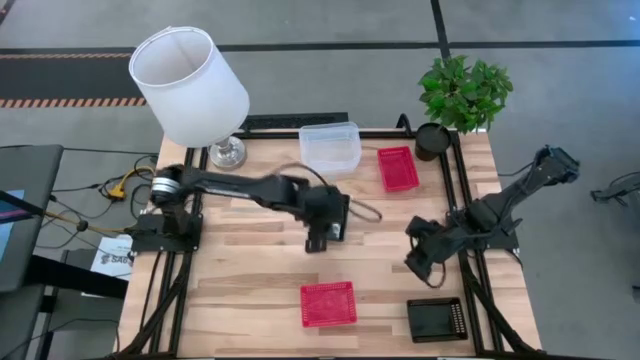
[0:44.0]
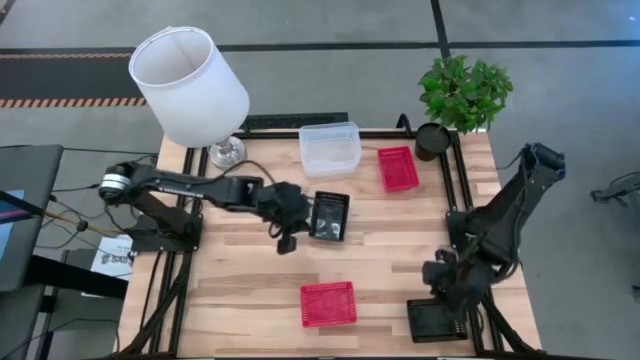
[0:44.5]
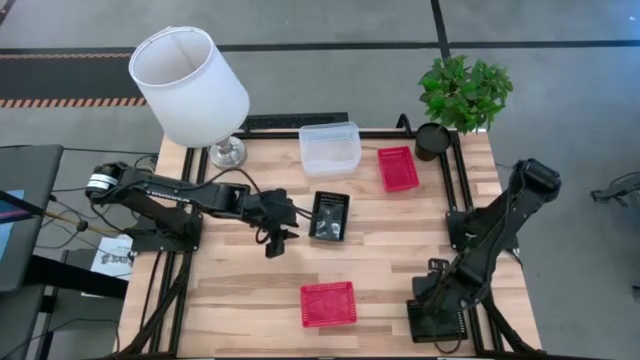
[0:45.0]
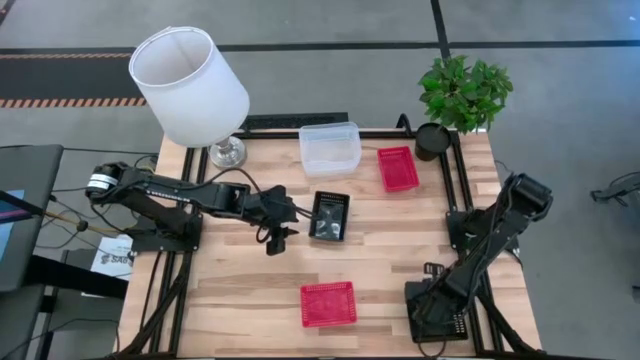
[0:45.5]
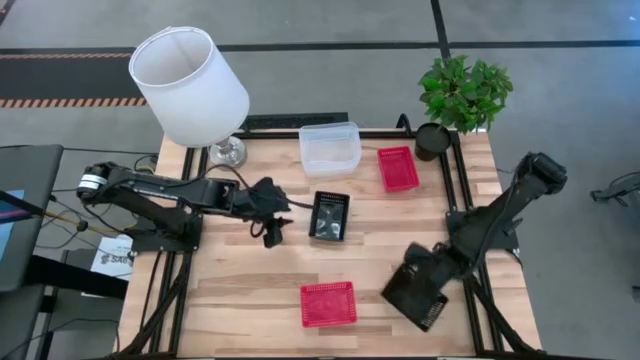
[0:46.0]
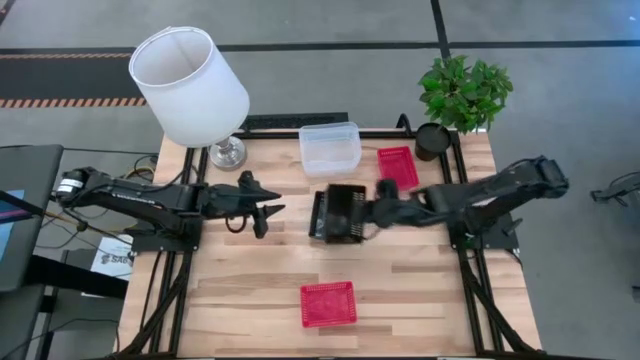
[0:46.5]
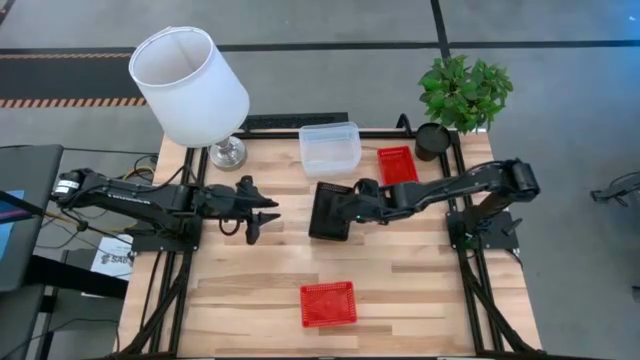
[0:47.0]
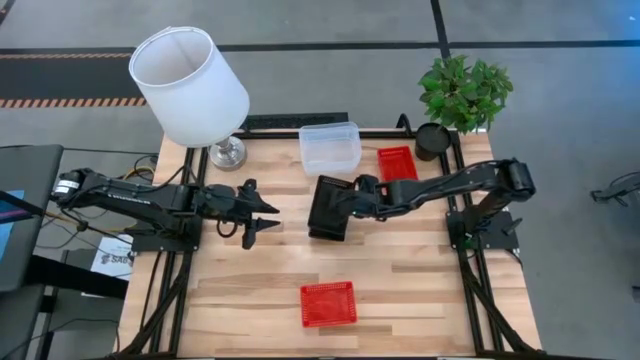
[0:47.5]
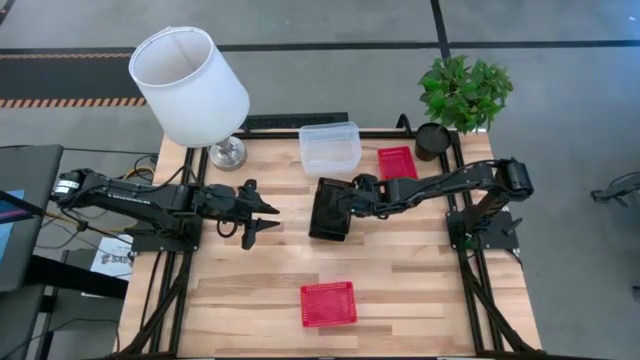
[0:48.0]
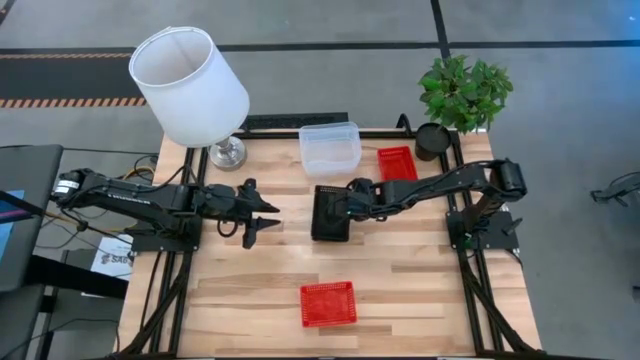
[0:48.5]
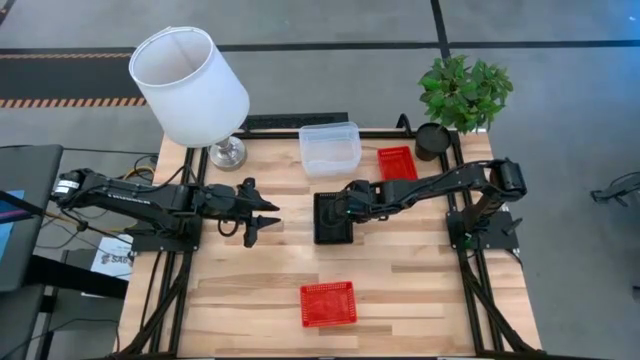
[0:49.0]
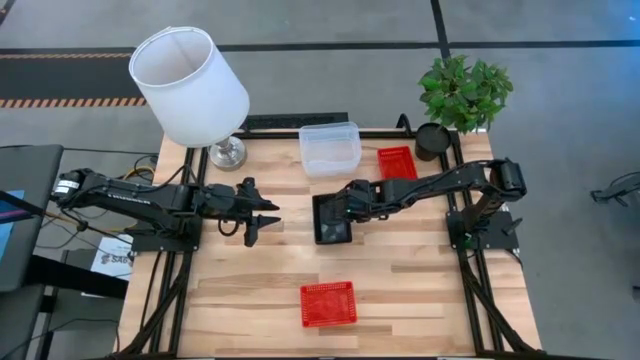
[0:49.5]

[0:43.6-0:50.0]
Stack the bottom black bin on the black bin

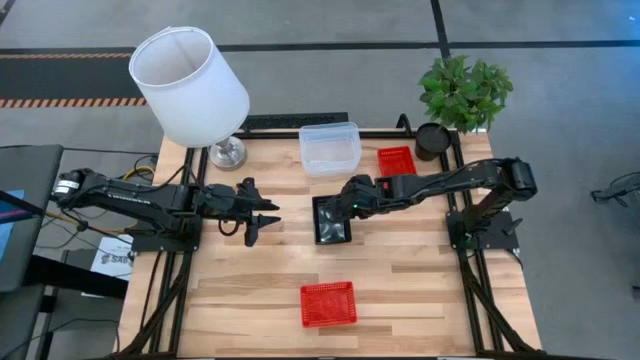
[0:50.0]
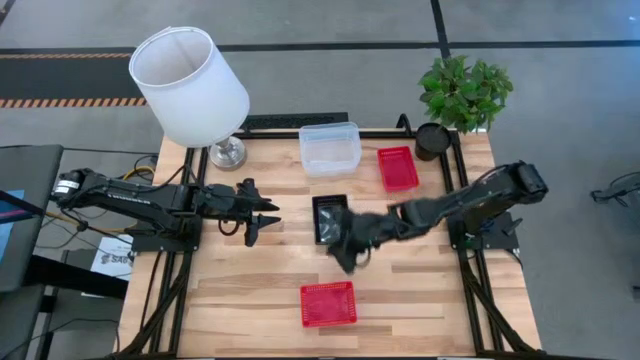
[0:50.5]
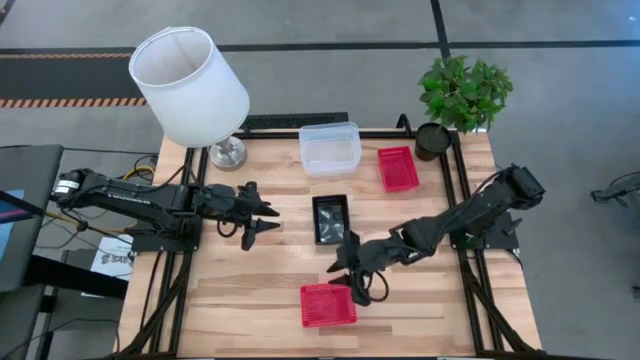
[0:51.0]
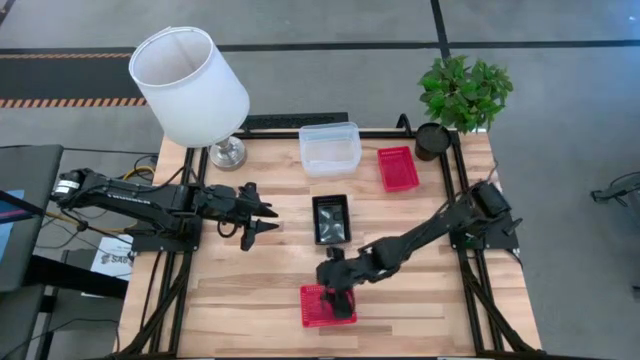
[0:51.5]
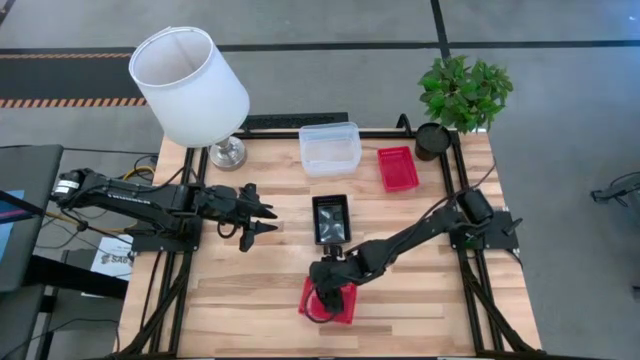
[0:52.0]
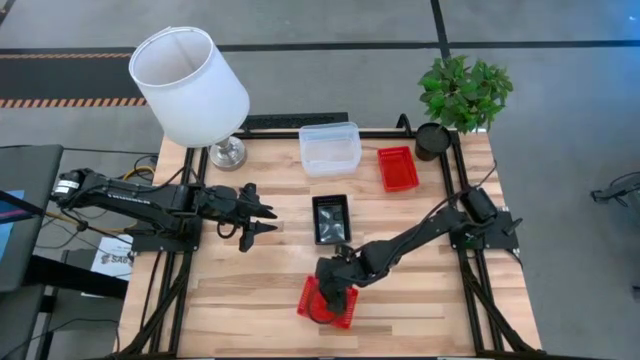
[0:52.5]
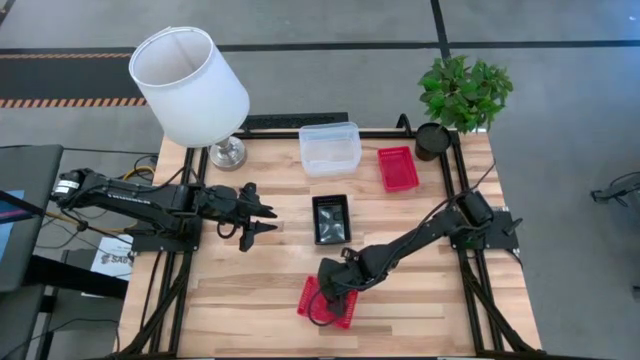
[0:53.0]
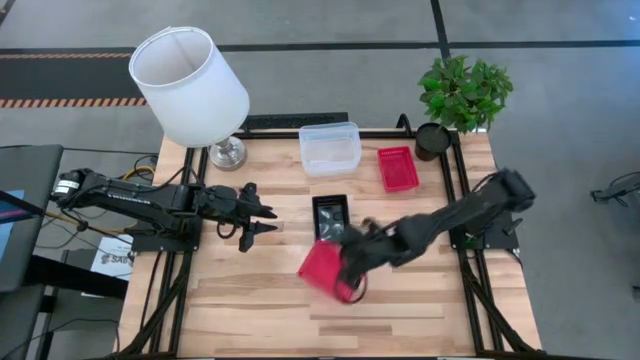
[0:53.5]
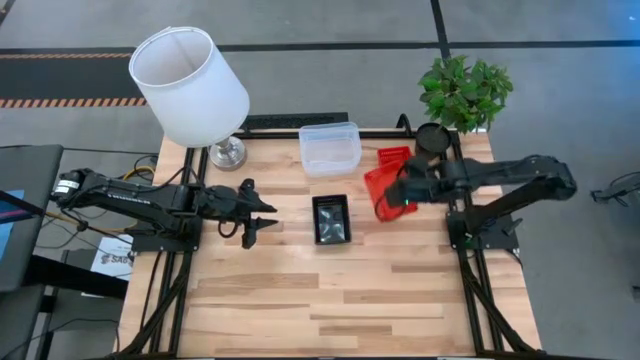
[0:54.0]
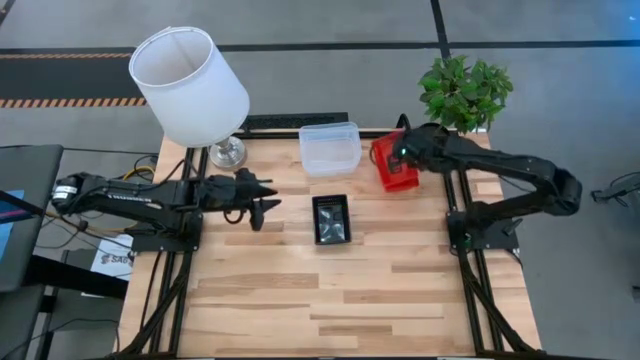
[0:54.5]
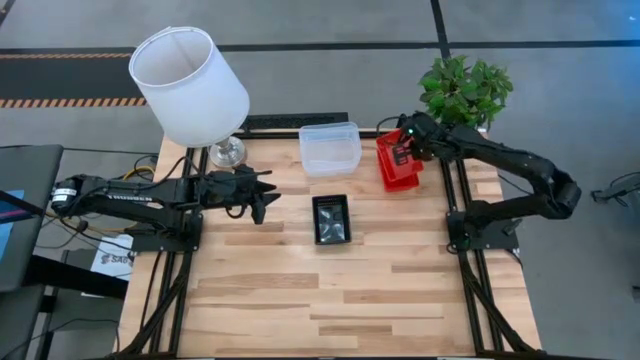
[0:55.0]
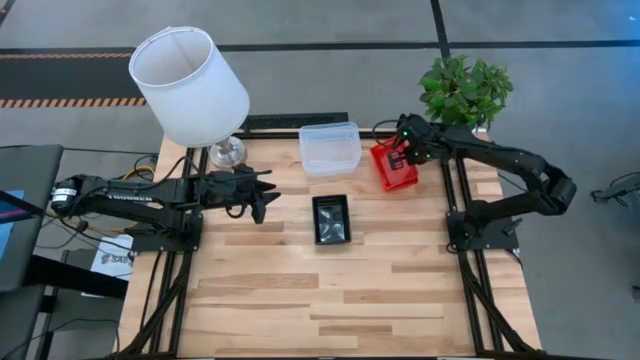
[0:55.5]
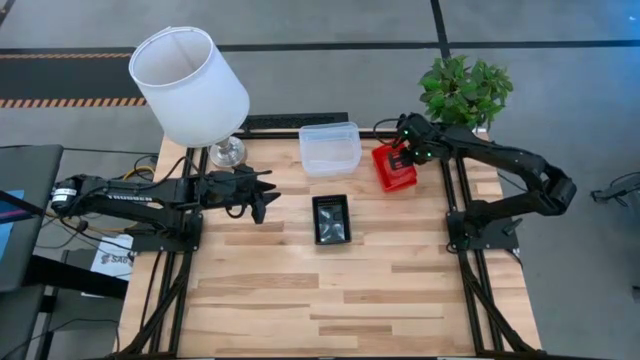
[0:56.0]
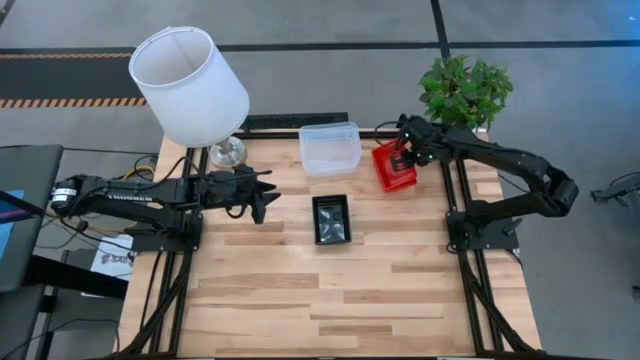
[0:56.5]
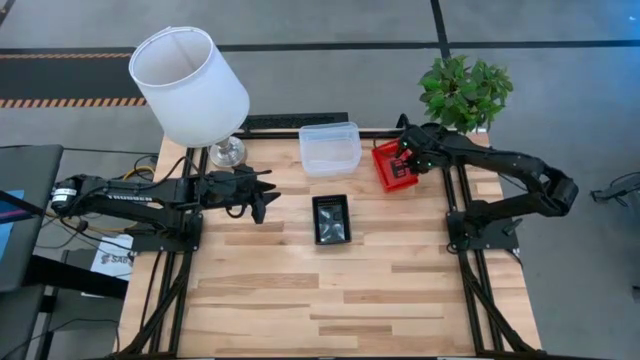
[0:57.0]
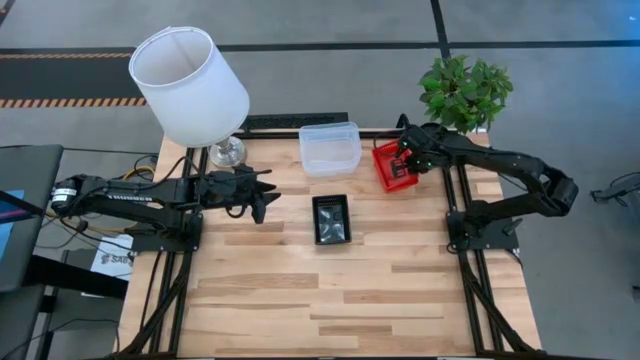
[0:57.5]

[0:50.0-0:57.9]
Stack the bottom red bin on the red bin

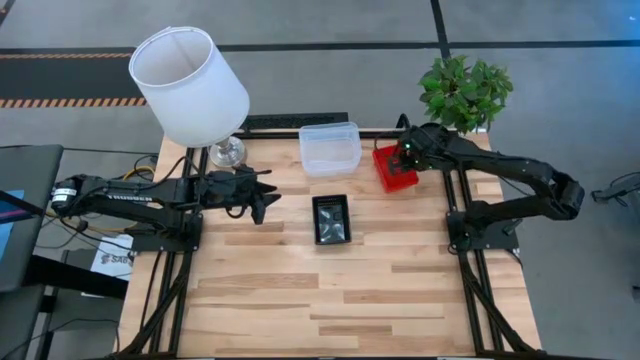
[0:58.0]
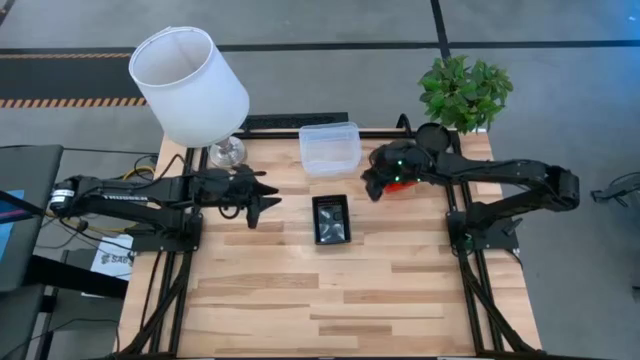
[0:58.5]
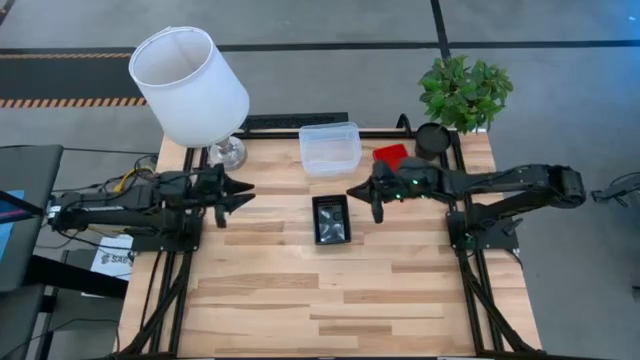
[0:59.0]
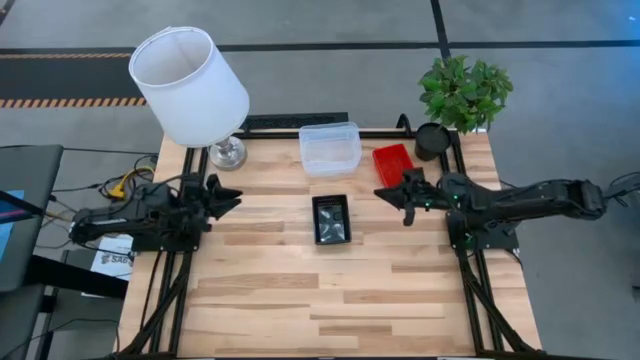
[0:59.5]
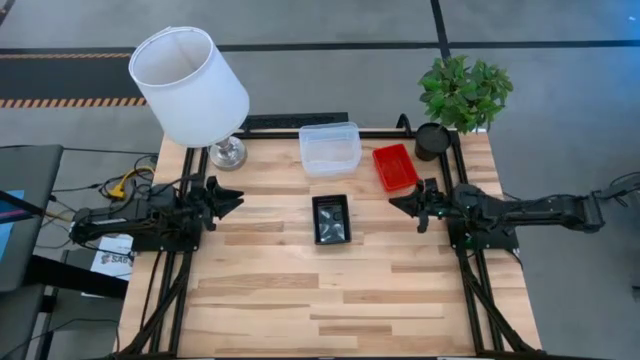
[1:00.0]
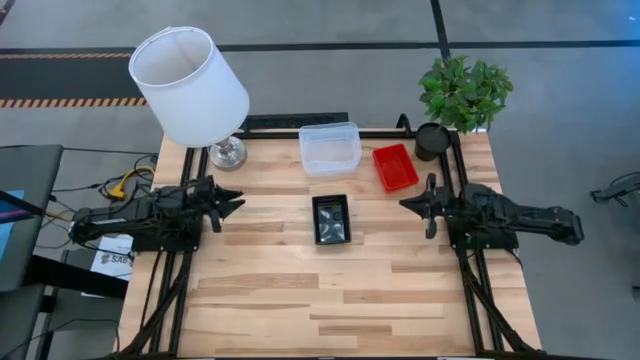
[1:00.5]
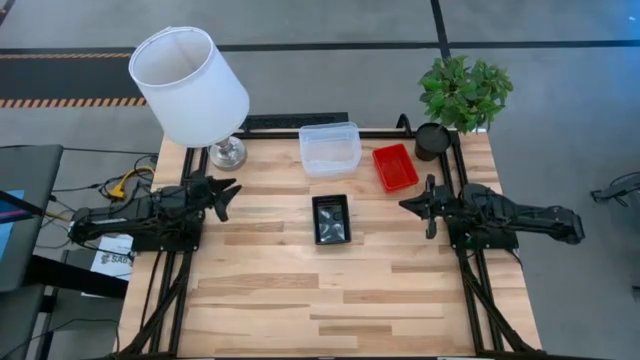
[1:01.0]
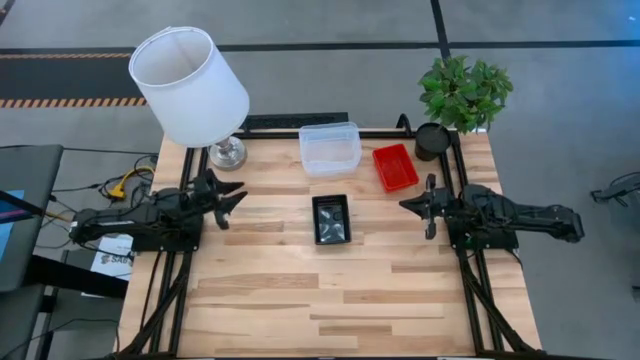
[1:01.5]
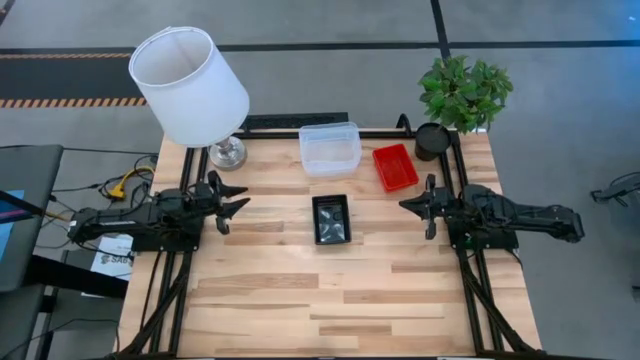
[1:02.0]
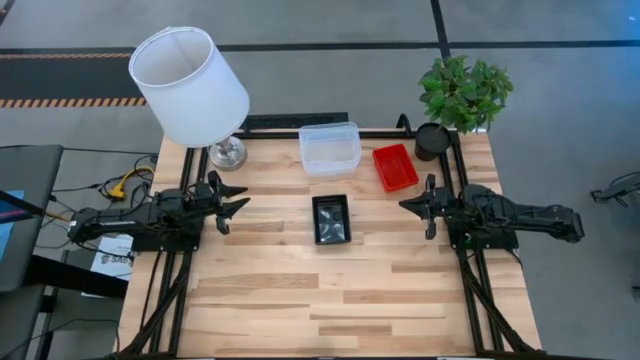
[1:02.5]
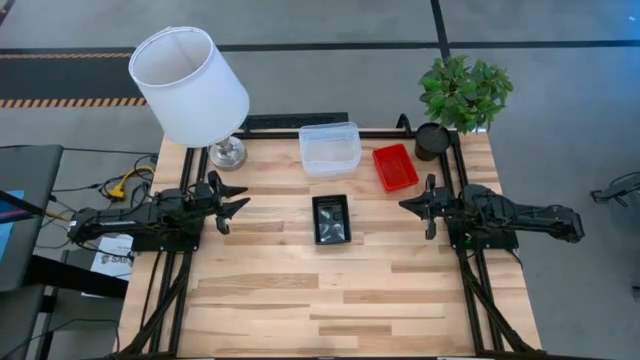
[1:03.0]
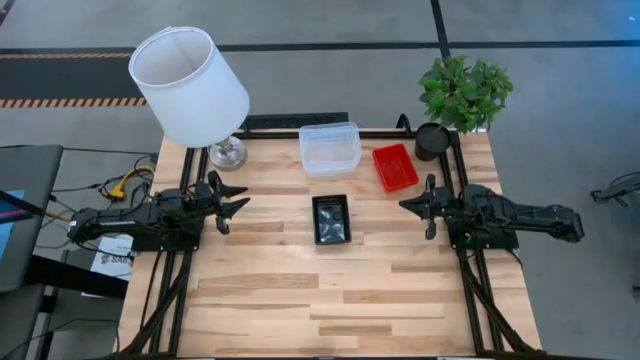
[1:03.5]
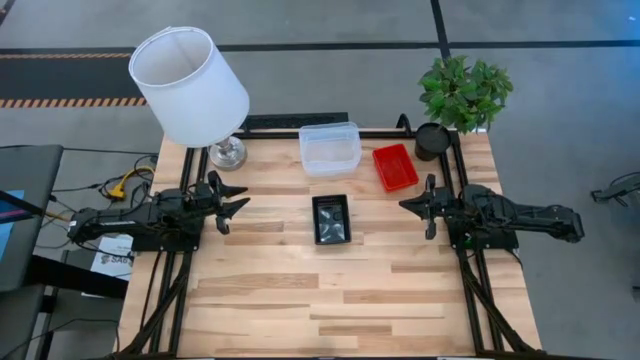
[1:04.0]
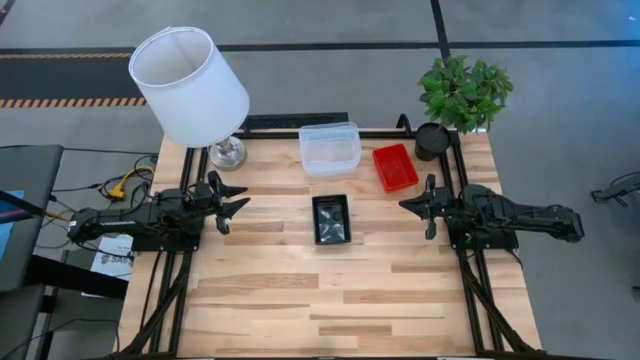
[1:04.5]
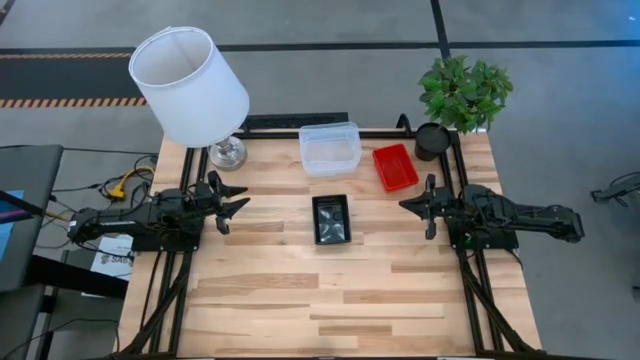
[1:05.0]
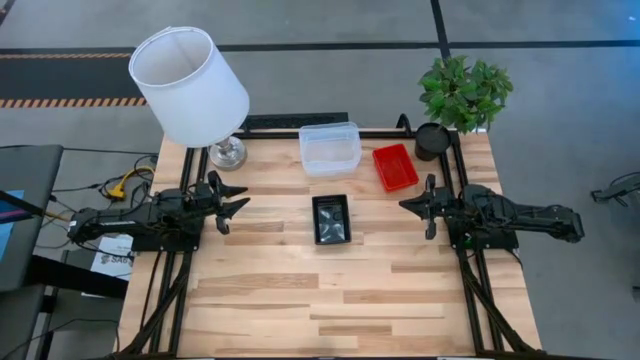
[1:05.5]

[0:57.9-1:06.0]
Return to Home Position
